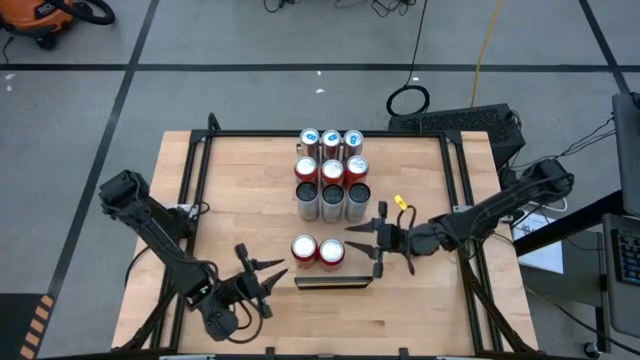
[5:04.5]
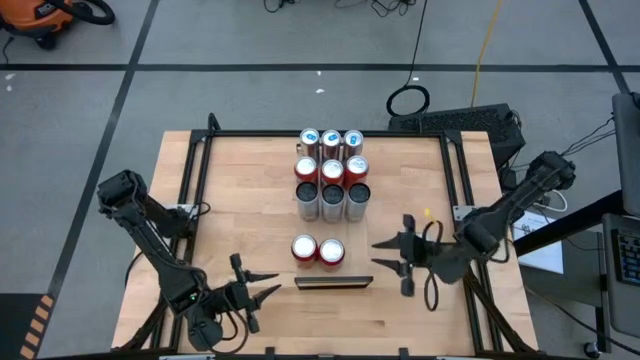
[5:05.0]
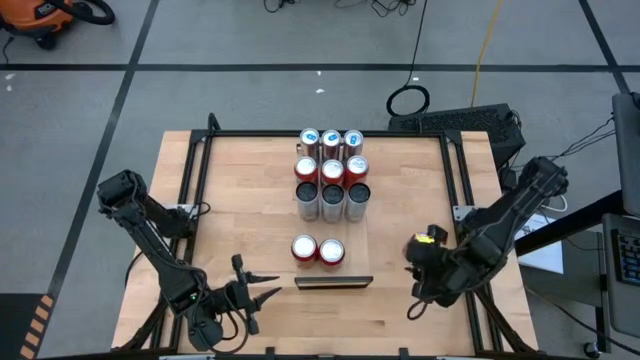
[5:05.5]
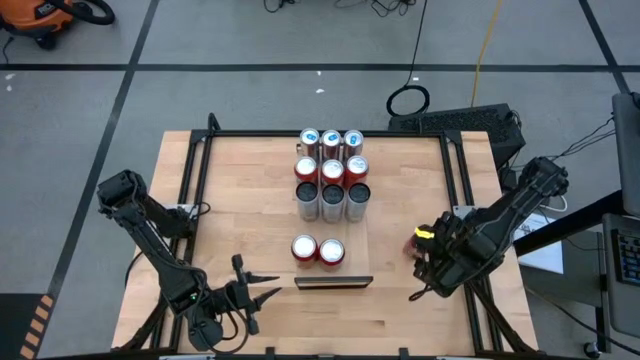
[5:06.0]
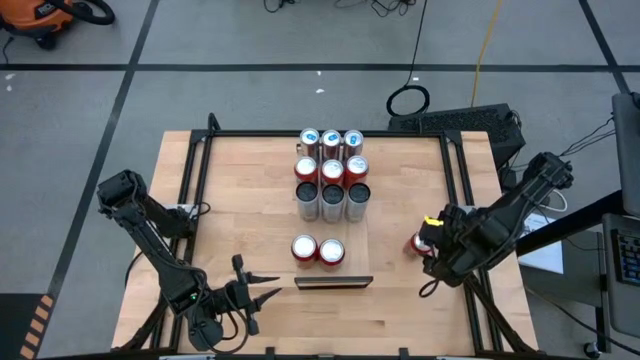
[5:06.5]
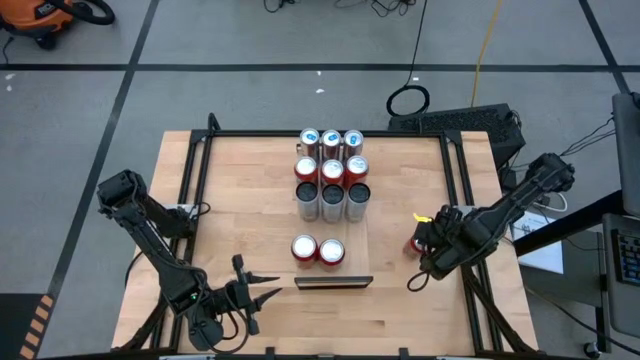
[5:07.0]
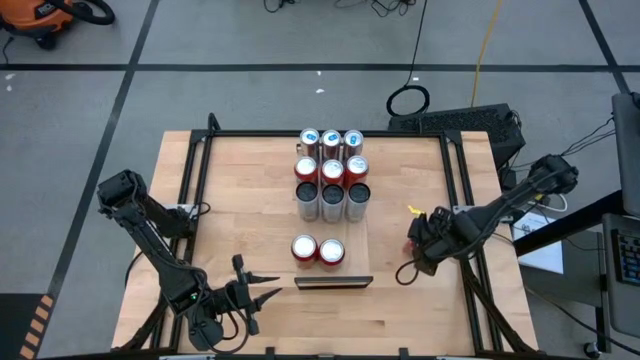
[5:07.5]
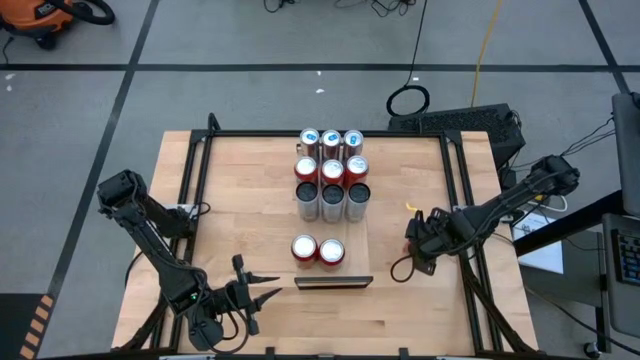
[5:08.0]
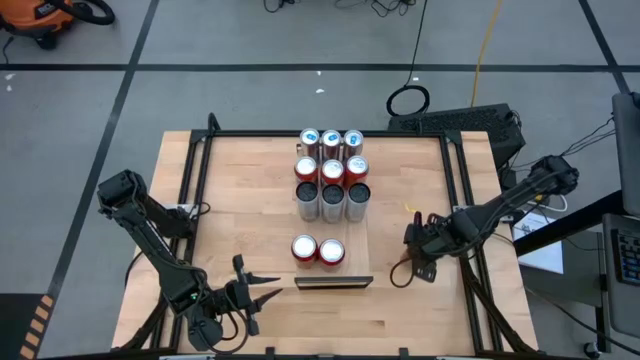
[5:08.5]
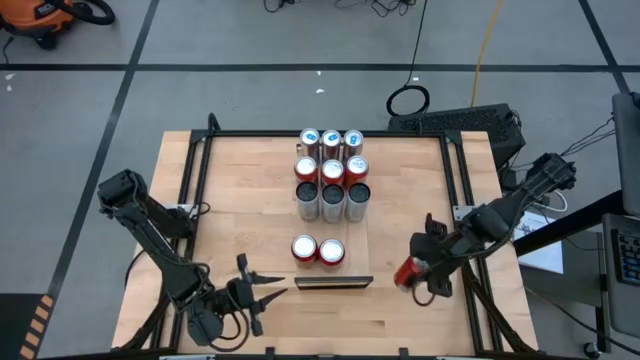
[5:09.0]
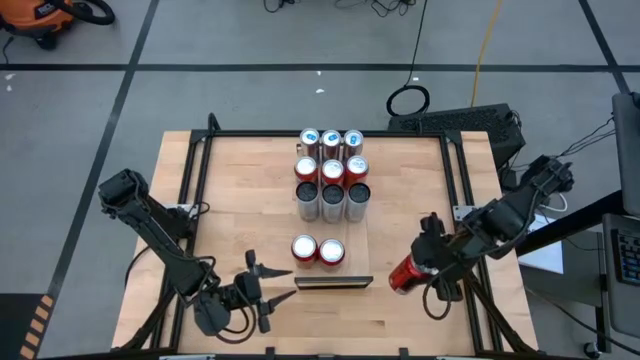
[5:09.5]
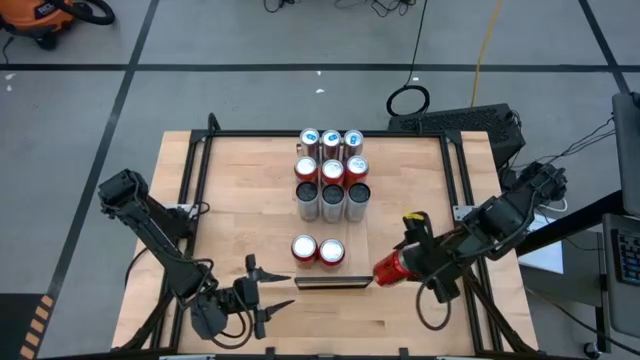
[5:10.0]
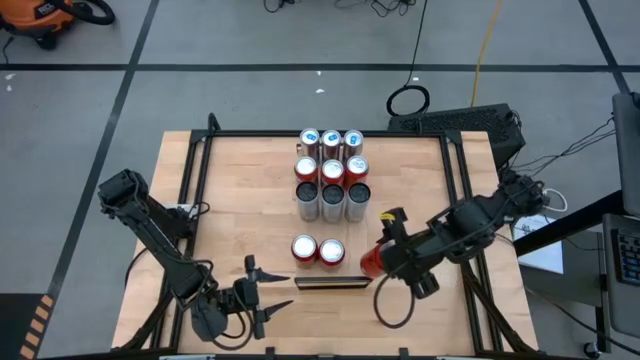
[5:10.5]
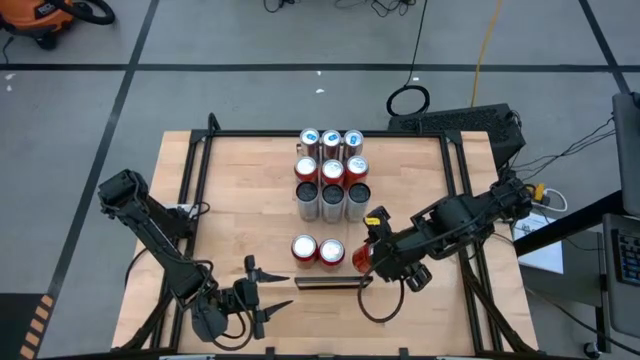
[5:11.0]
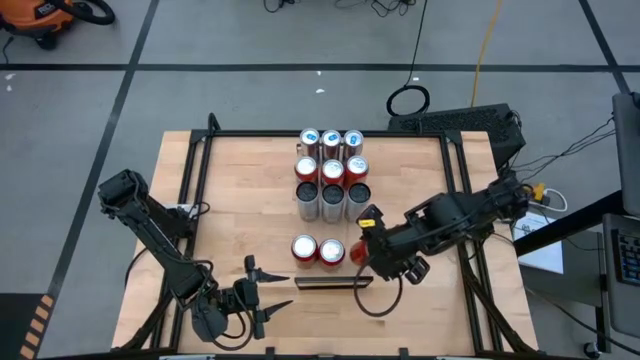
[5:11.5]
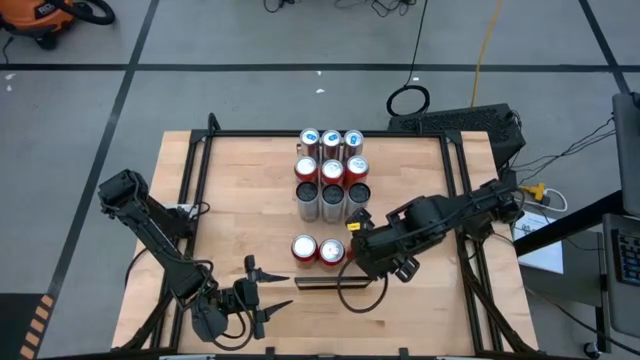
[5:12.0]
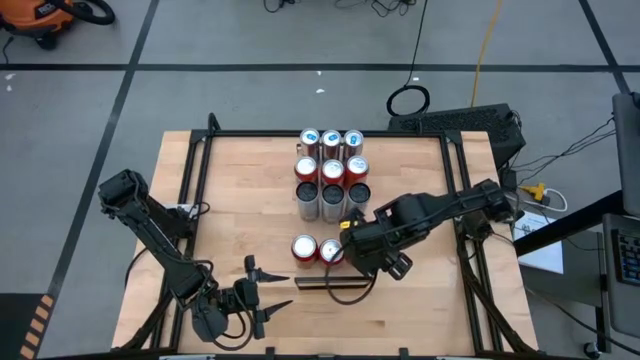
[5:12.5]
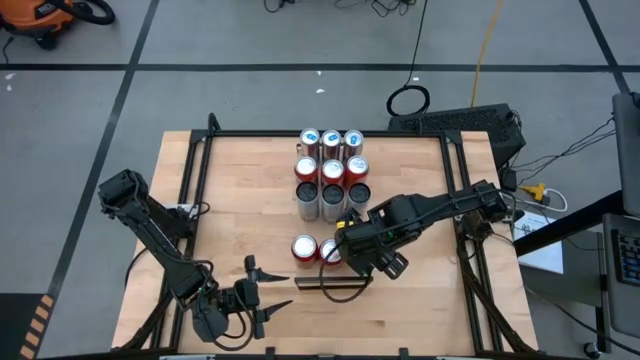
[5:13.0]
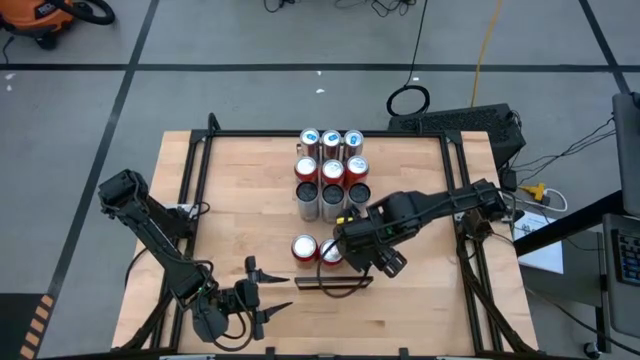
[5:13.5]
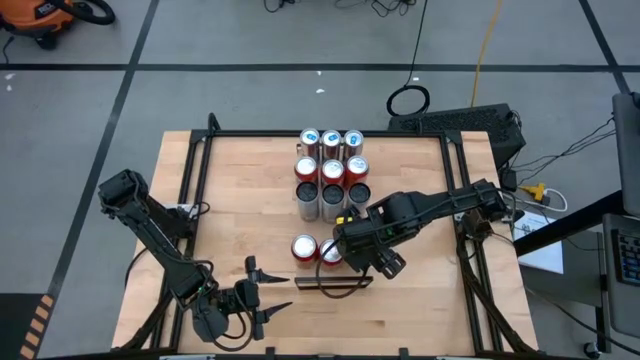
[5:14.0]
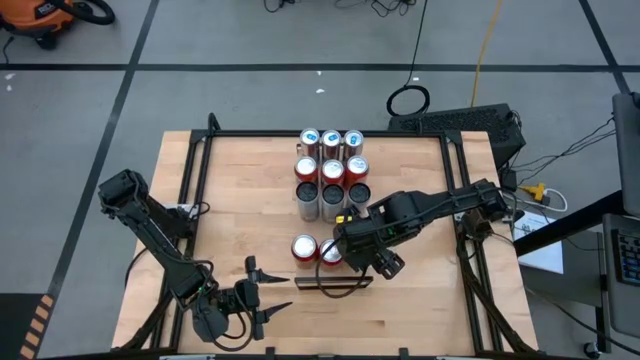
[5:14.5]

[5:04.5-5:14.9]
Task: Place canned beverage on shelf
Put the red black soda can on the shelf aligned with the other red black soda can

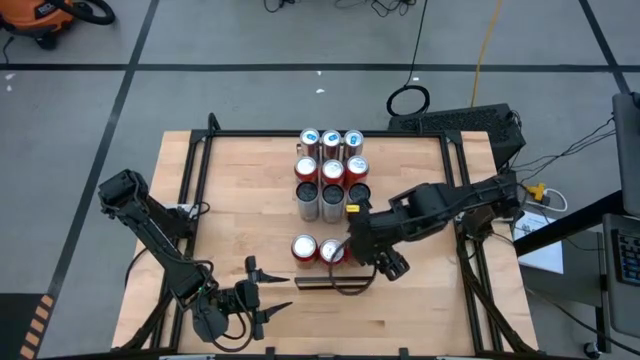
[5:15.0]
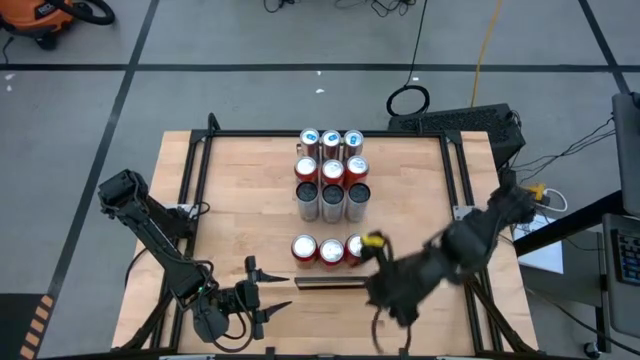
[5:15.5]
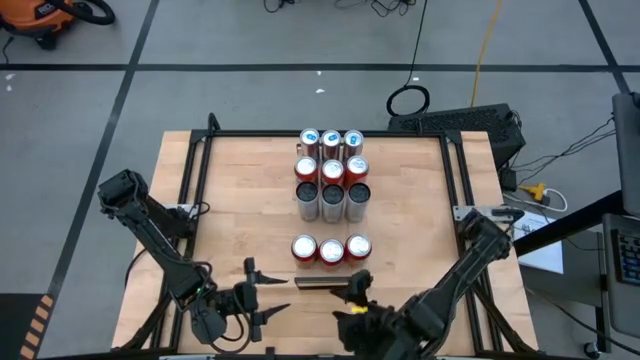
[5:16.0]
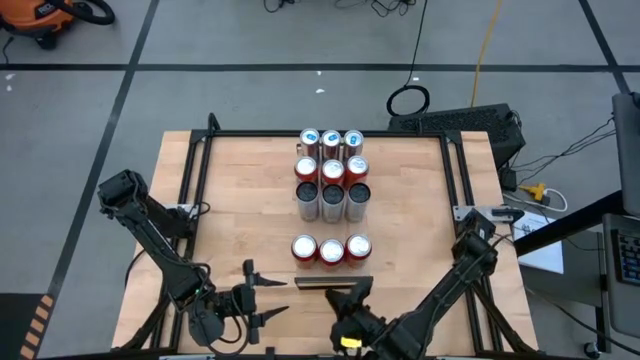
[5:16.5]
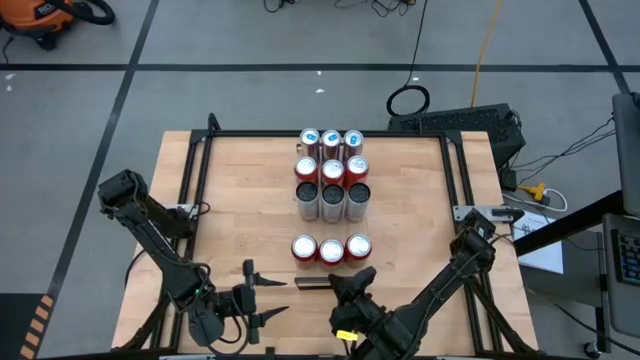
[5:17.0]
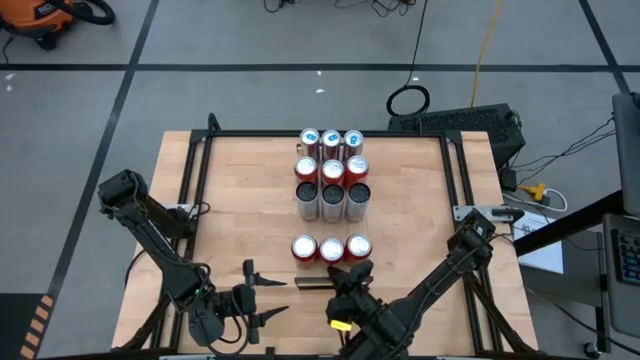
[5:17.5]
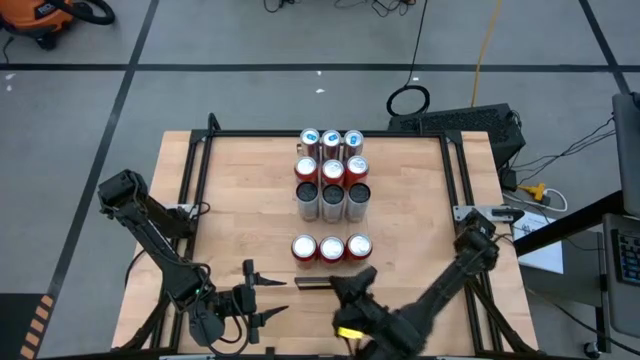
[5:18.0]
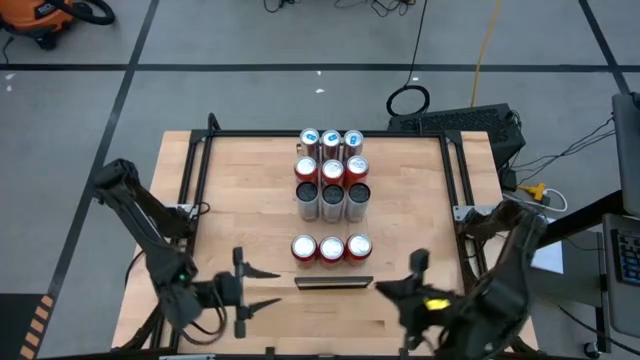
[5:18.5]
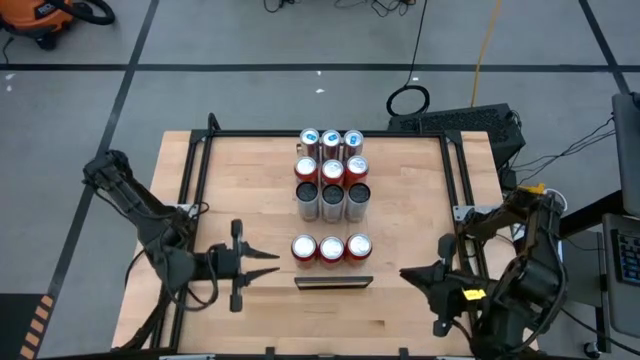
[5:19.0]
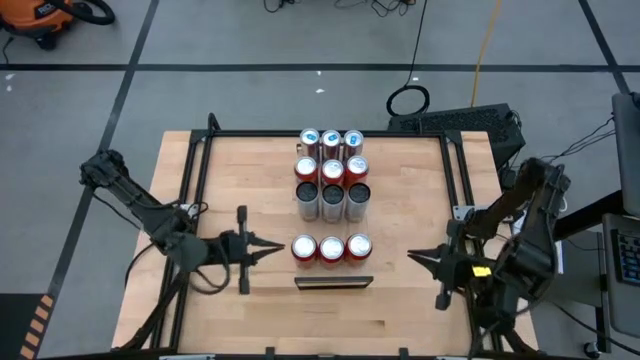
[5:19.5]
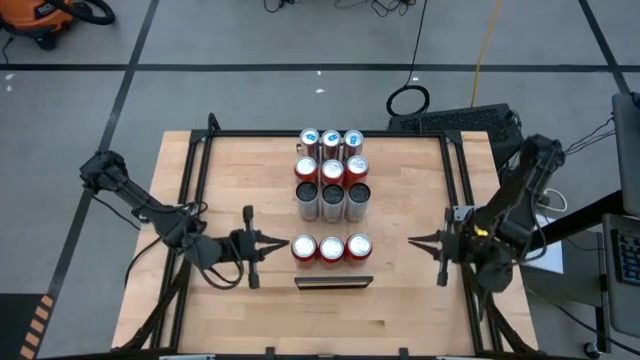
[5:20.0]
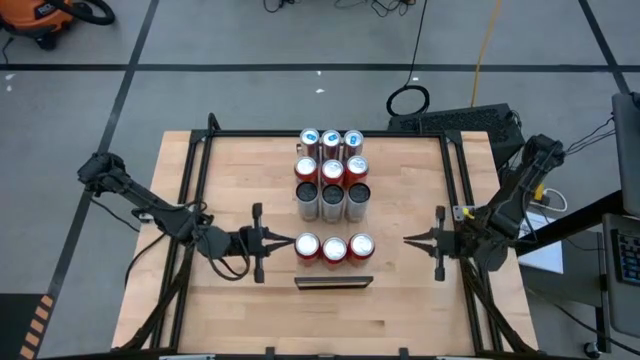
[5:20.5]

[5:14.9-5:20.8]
Adjust the red black soda can on the shelf

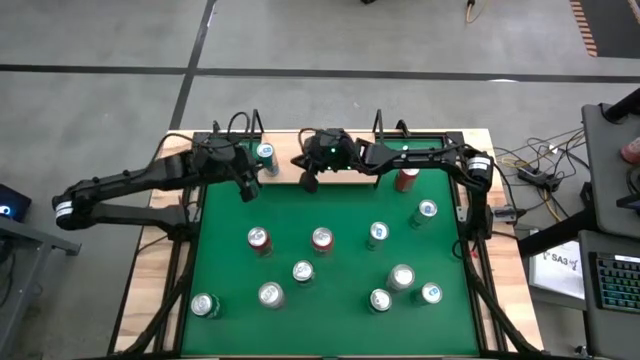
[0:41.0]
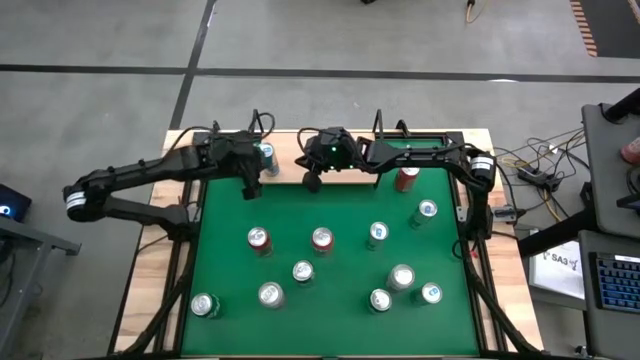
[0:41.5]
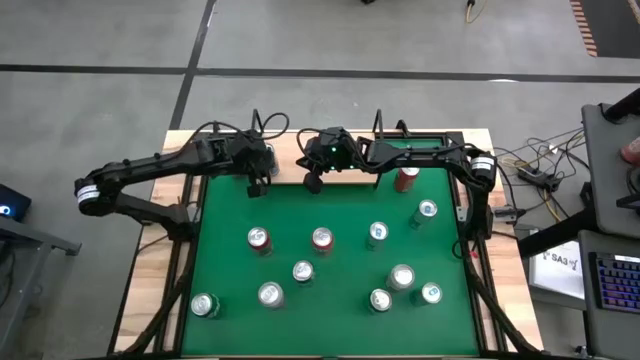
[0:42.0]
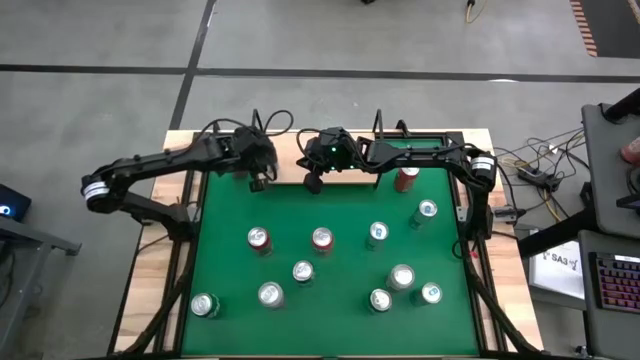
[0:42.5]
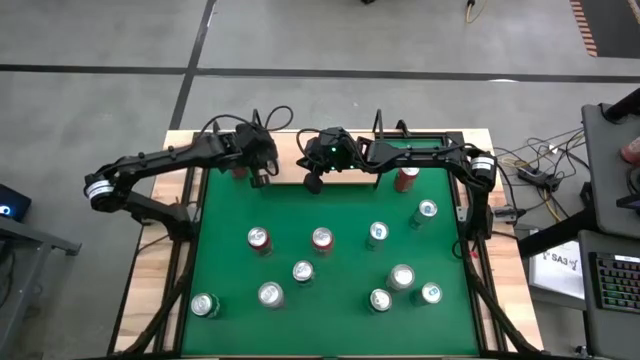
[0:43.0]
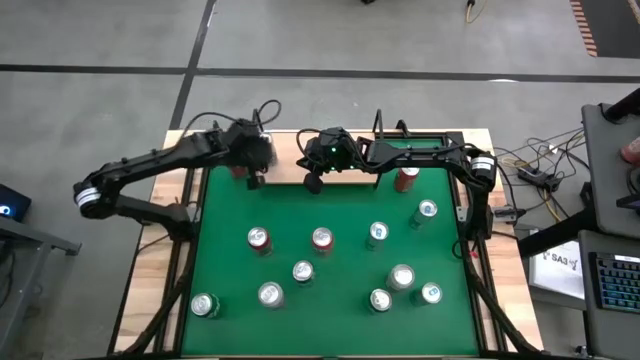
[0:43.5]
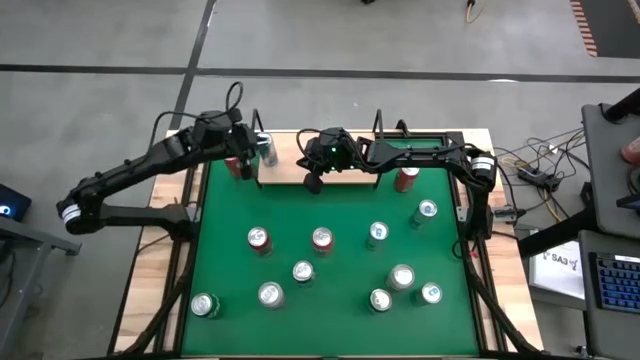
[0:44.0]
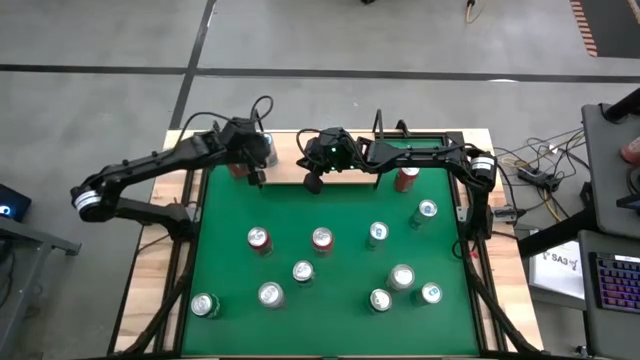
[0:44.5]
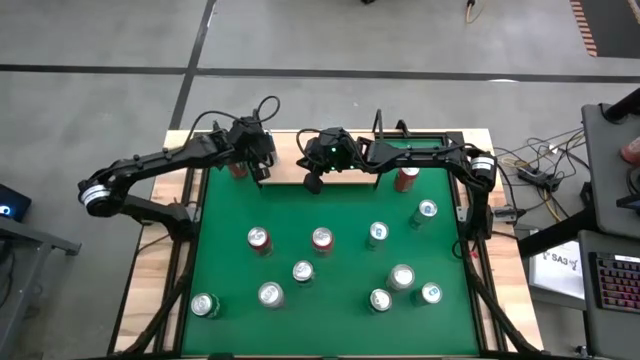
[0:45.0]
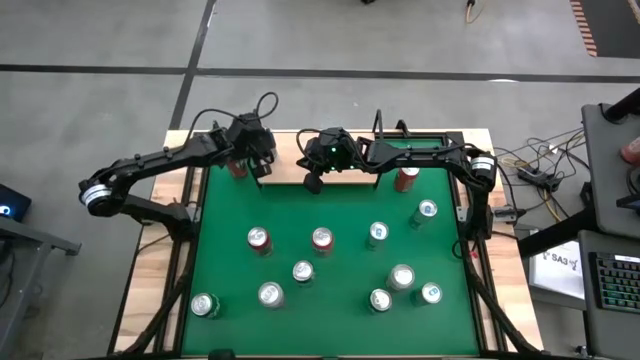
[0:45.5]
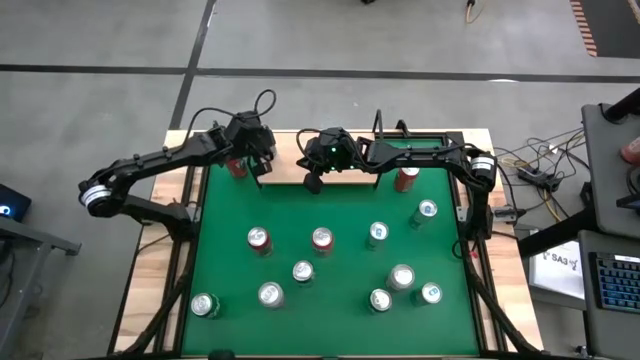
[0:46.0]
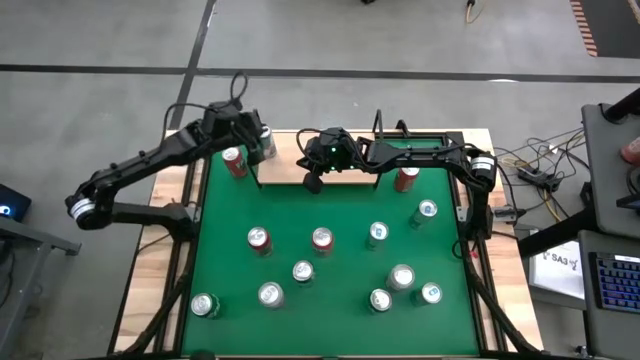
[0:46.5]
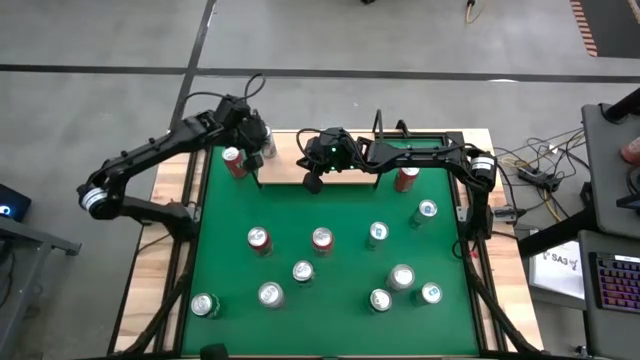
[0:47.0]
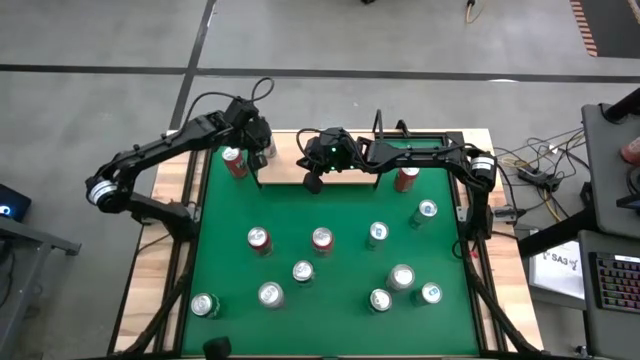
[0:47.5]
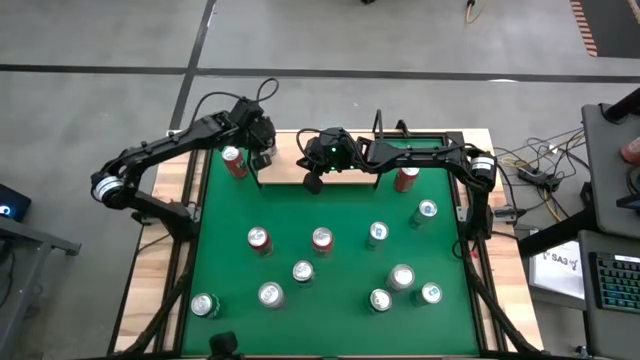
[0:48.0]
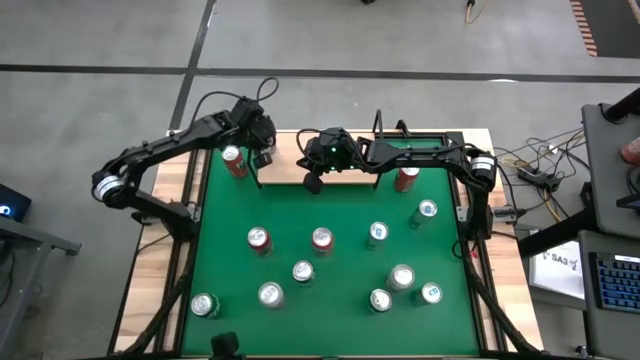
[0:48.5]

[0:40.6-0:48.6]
Task: Pick and place cans onto a shelf
Adjust the blue silver soda can
